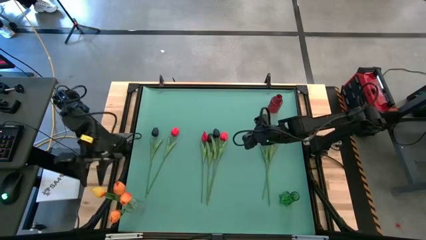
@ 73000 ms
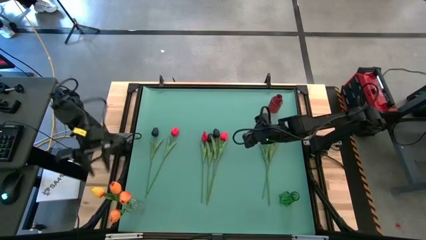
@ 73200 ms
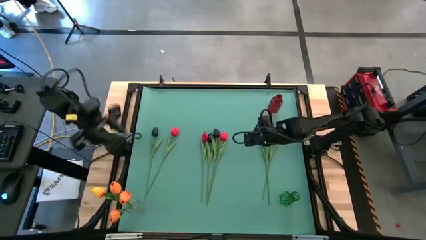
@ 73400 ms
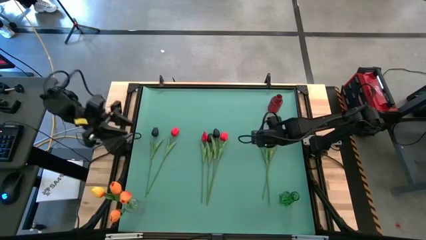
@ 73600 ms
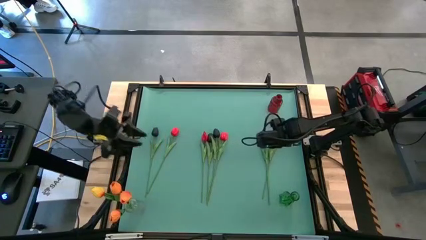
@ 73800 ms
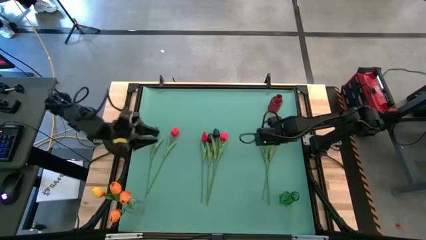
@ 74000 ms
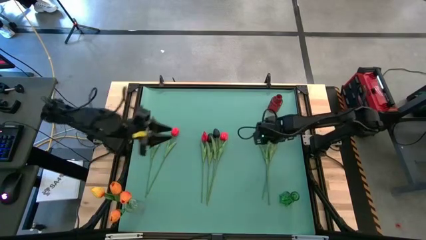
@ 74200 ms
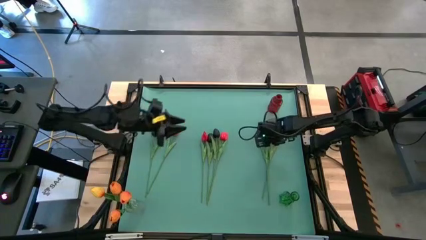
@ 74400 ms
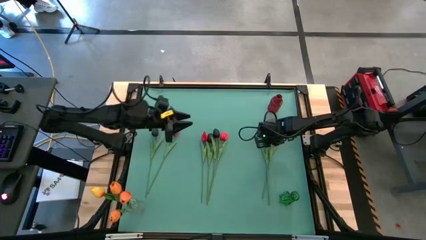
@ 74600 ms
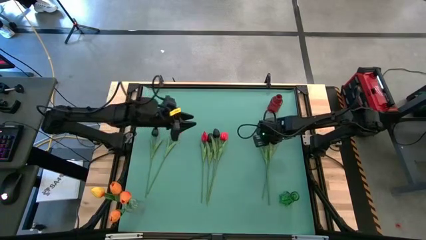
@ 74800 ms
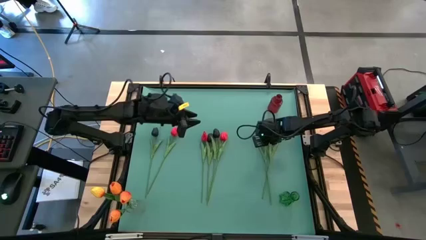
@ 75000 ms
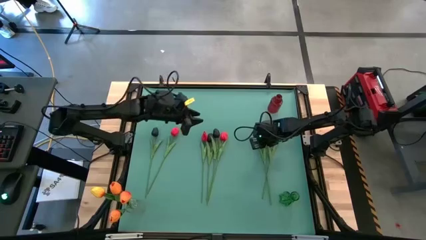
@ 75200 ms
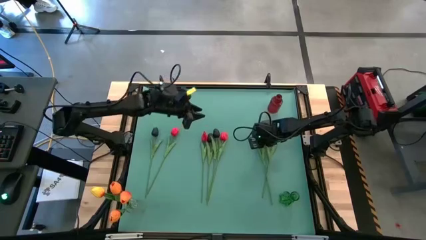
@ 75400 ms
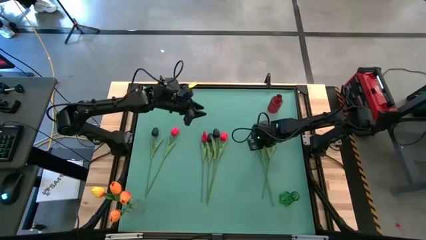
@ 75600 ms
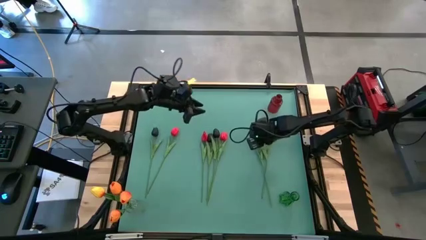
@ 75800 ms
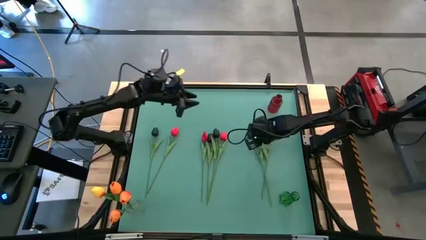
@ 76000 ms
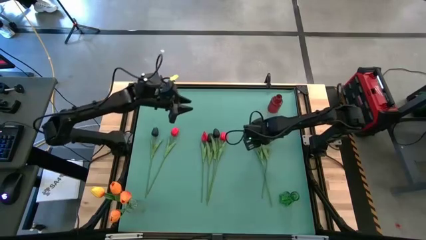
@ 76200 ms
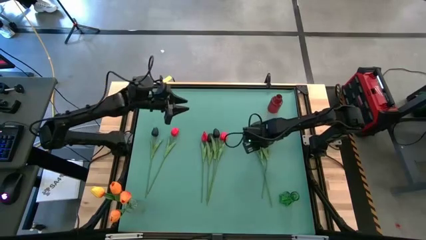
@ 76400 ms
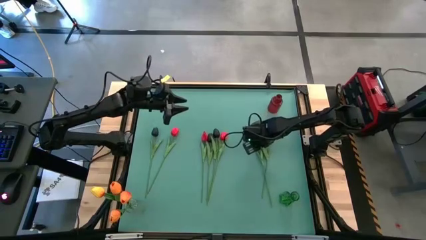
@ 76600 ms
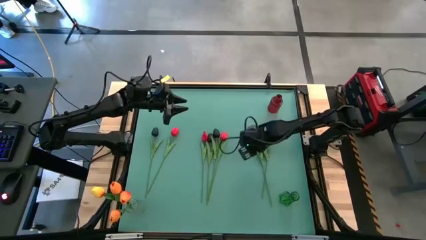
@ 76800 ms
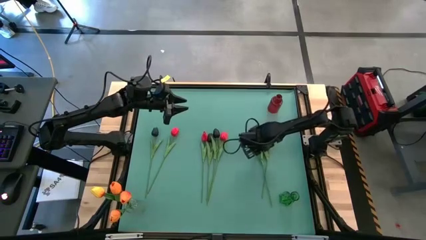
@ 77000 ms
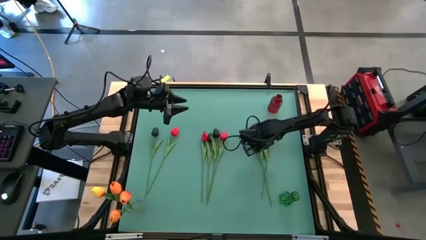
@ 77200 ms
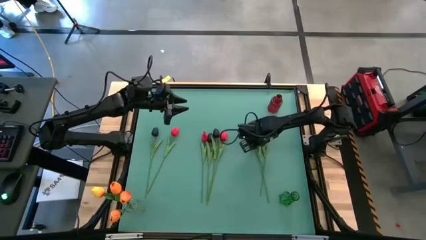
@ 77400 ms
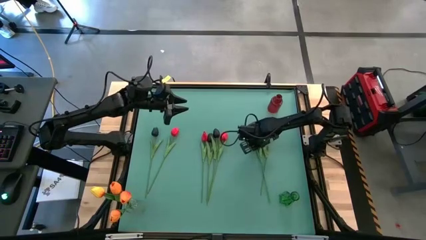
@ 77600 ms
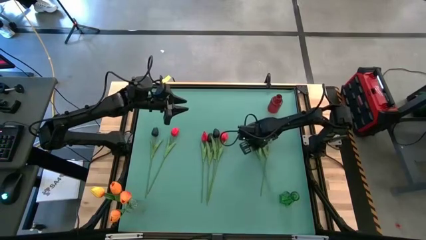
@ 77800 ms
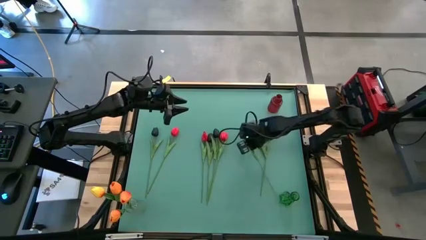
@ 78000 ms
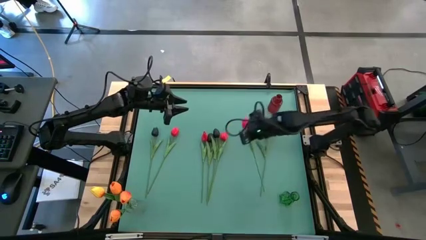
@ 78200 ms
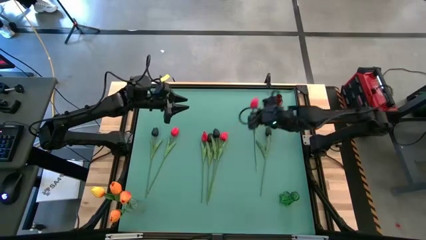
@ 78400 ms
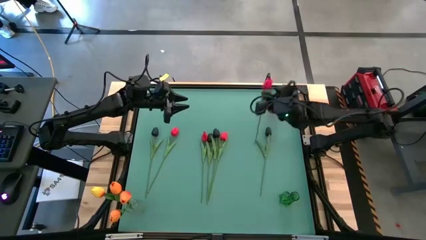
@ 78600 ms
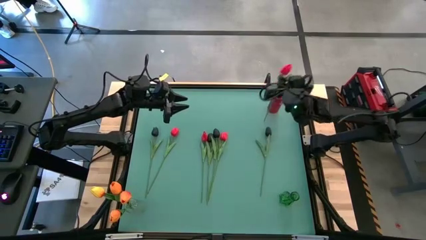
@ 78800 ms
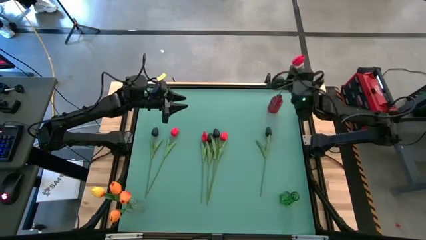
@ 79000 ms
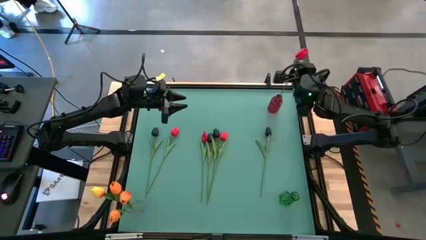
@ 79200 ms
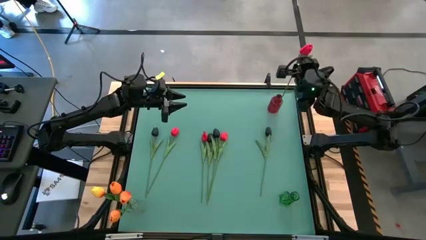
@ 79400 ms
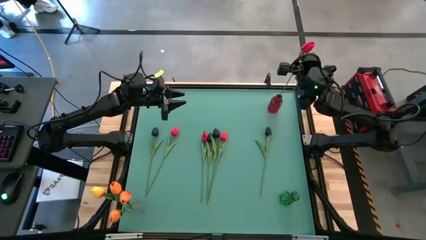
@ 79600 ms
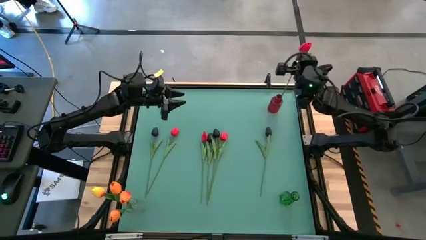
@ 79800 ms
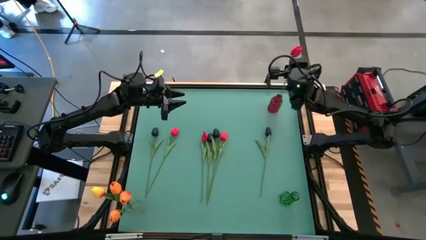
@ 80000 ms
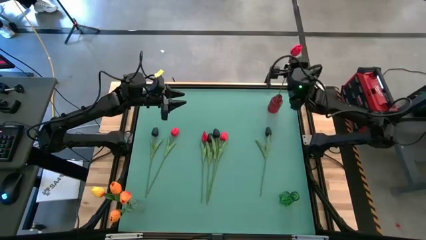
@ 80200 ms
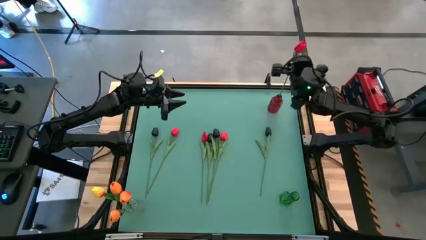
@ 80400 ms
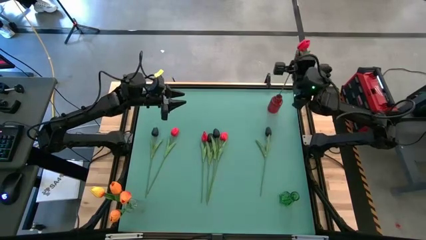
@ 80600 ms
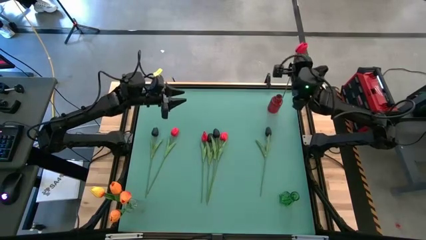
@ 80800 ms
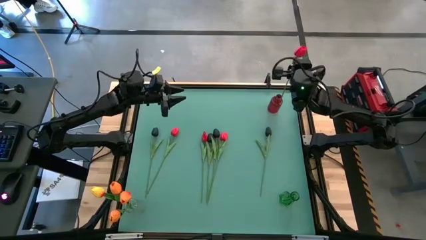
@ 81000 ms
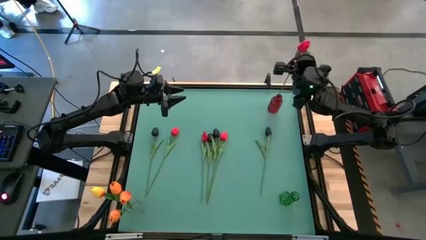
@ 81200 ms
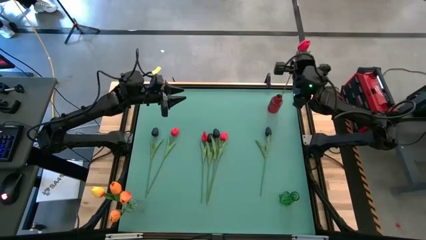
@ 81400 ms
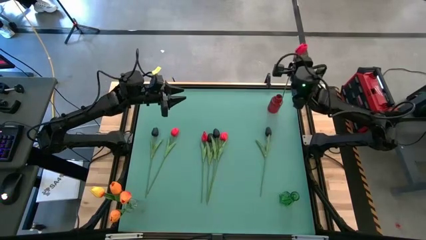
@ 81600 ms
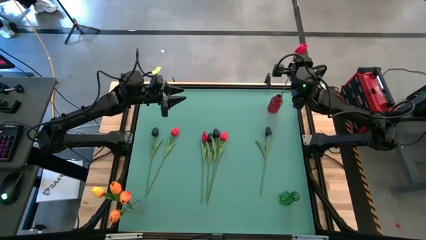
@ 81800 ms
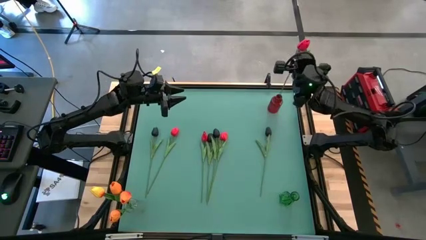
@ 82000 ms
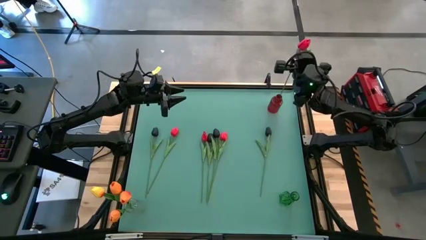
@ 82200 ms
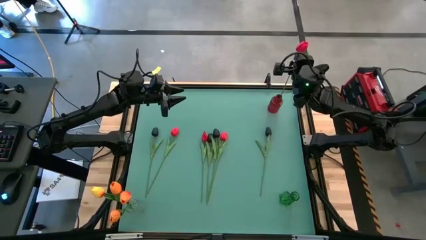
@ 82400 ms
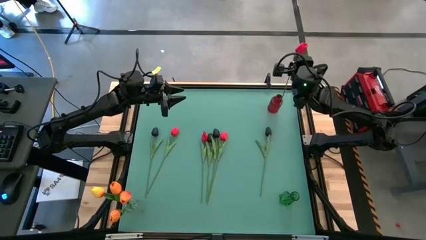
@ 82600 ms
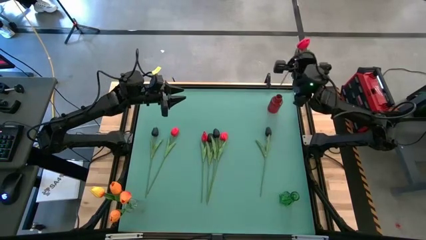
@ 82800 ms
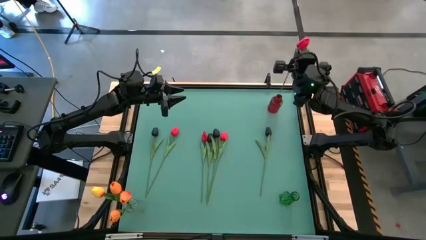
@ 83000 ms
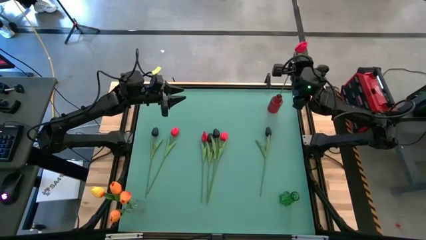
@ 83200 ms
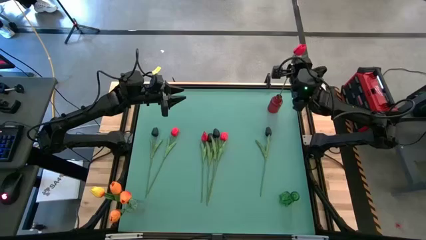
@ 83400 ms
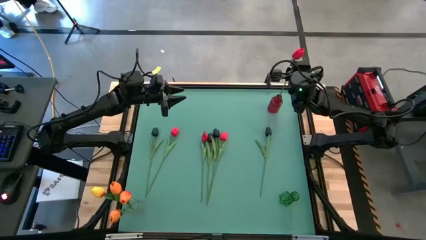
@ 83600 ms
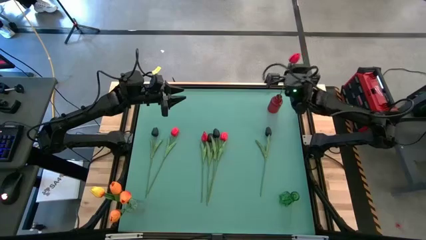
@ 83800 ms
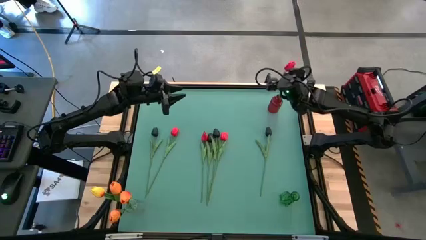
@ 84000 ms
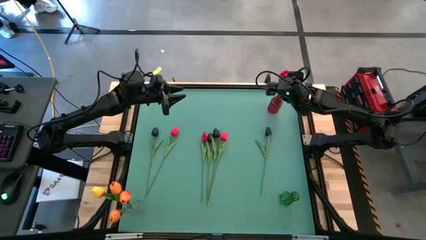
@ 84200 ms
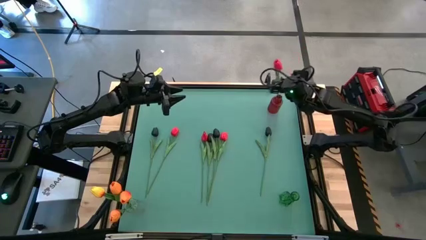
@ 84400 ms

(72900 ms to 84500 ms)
Task: Sort flowers into vase by color
Put the red tulip into the red vase

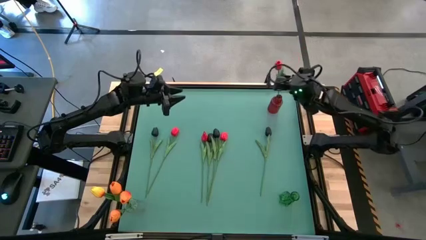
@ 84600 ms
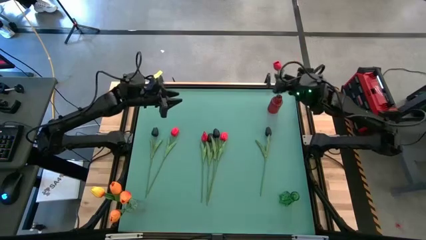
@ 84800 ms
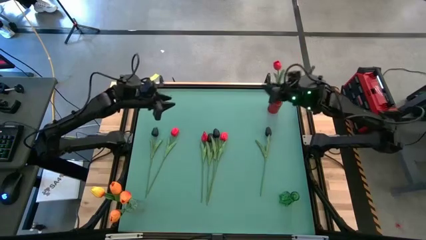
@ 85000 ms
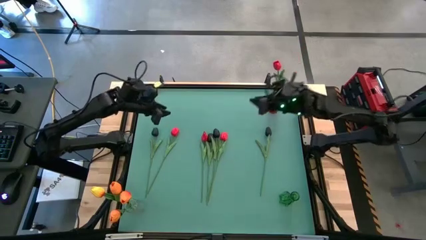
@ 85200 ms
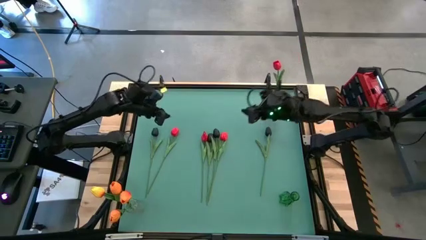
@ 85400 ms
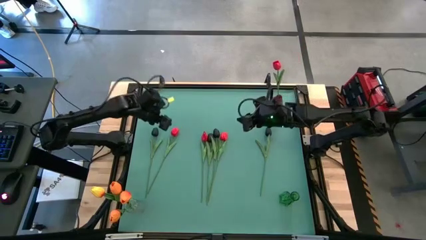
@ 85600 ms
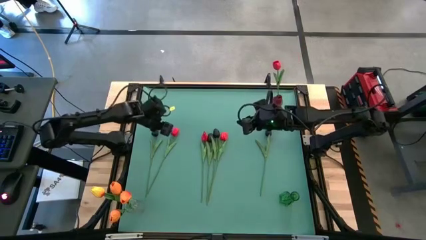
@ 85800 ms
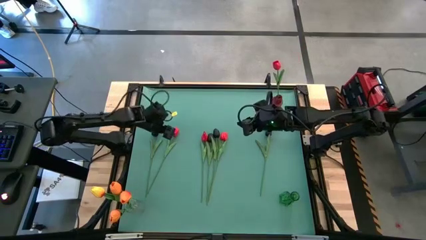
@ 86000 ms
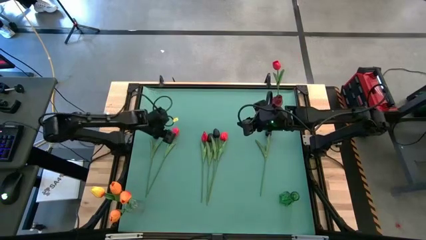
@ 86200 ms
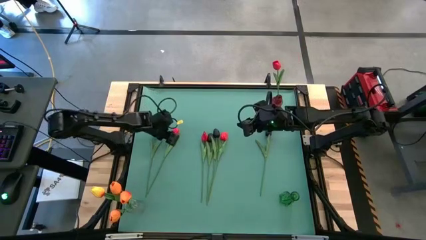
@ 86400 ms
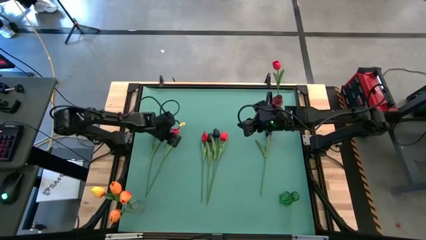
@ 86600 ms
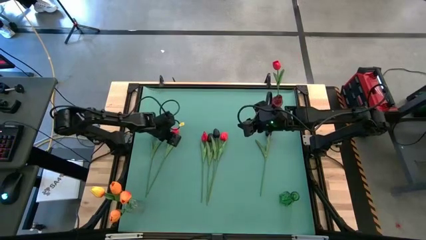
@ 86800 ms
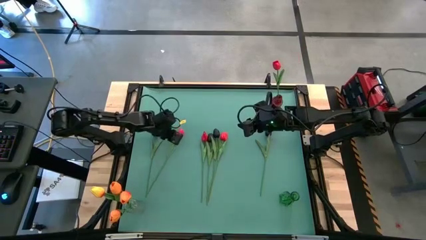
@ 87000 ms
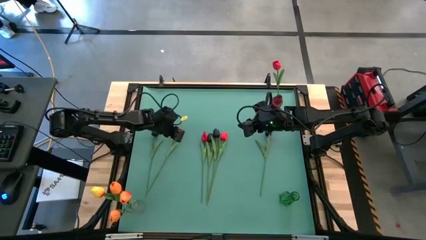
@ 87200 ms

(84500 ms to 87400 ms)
Put the red tulip into the red vase
